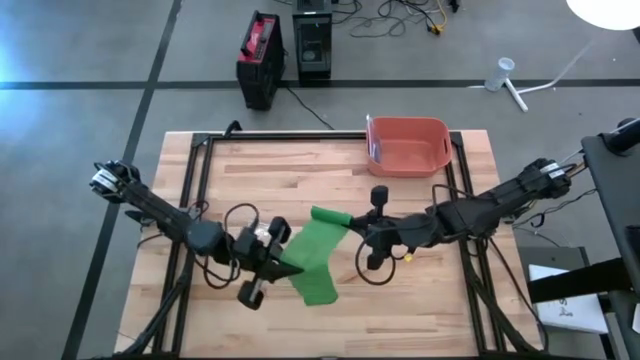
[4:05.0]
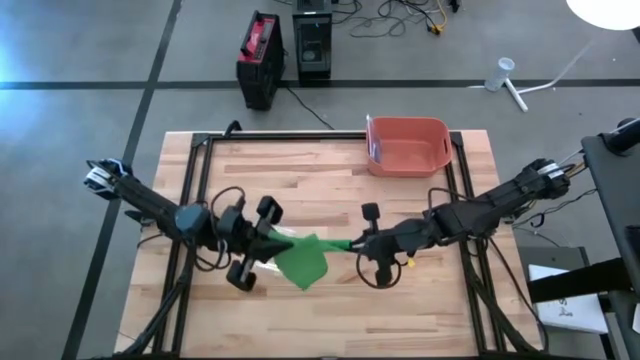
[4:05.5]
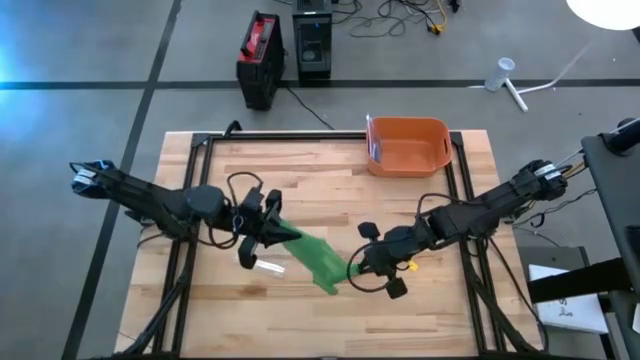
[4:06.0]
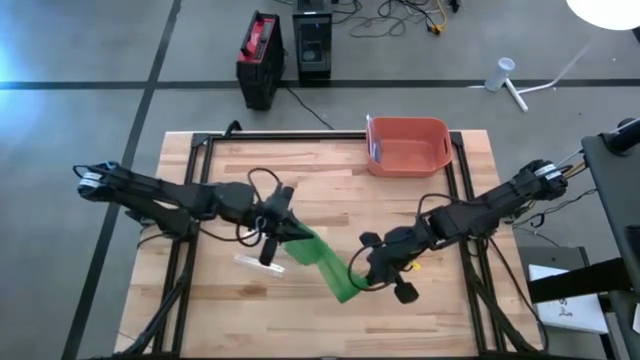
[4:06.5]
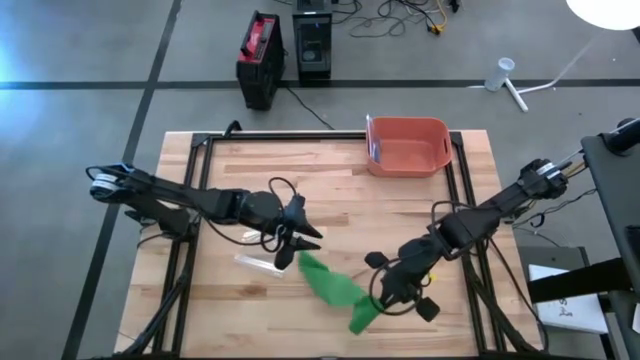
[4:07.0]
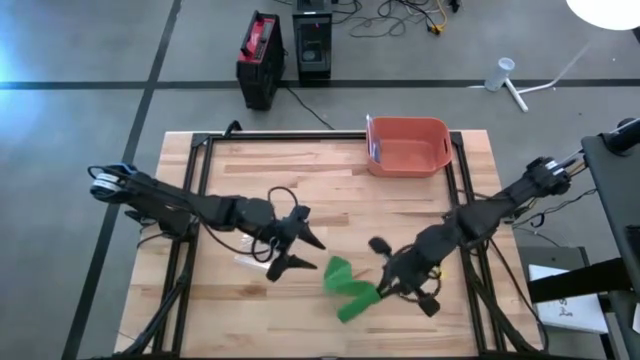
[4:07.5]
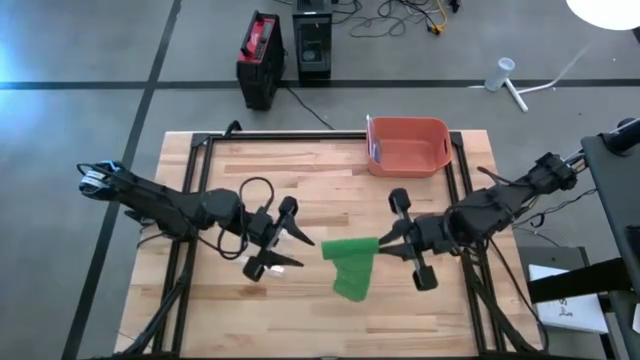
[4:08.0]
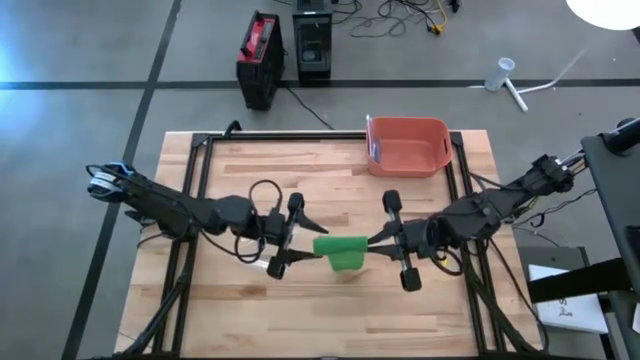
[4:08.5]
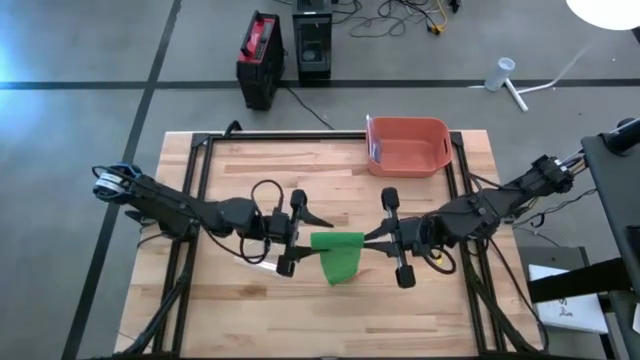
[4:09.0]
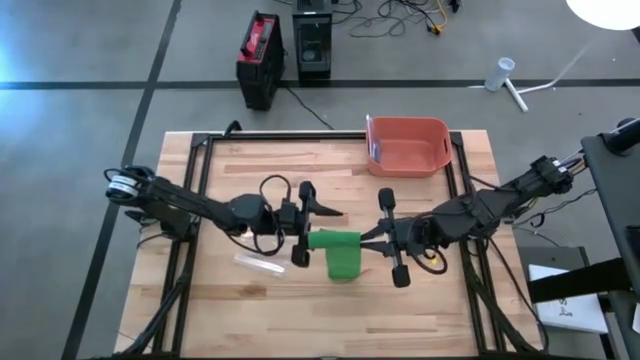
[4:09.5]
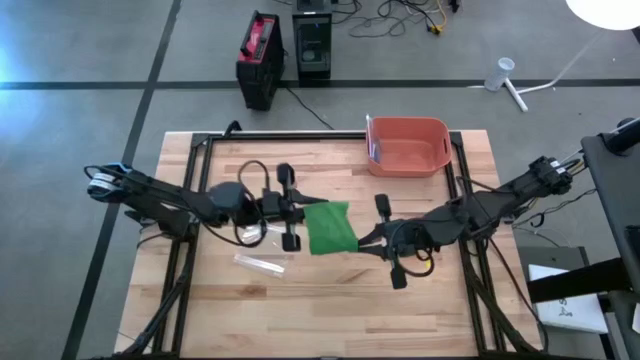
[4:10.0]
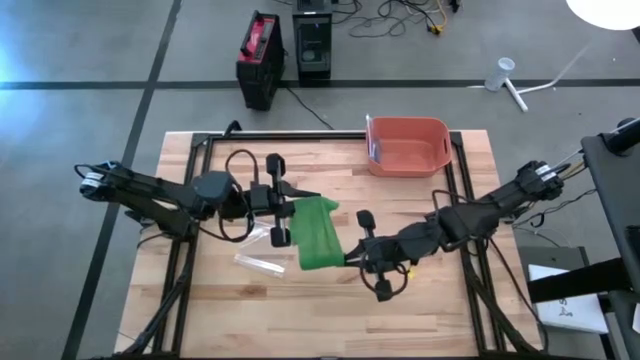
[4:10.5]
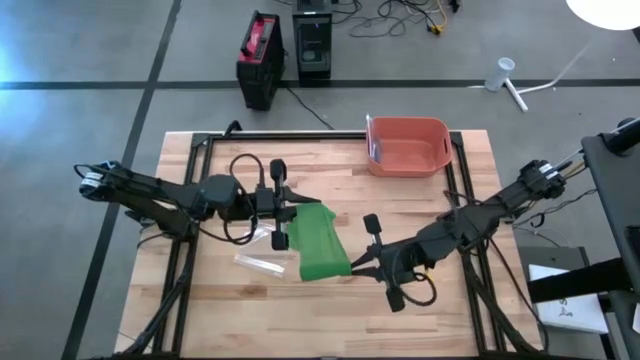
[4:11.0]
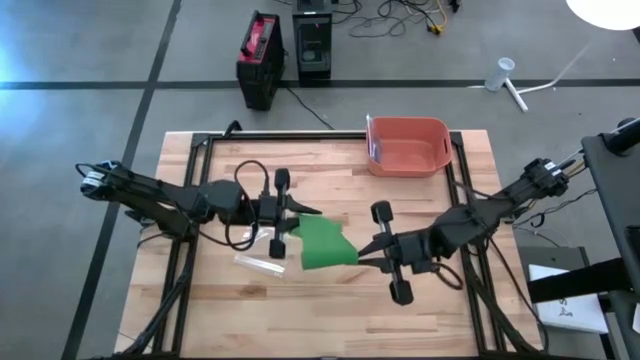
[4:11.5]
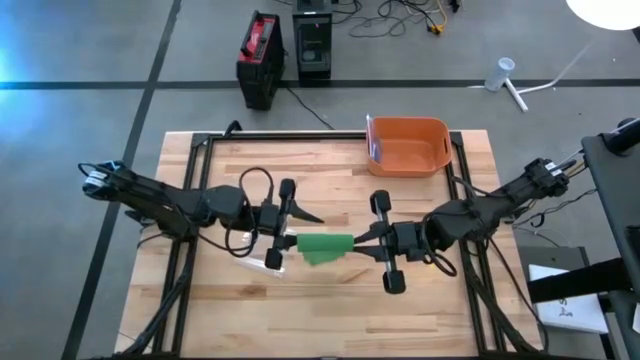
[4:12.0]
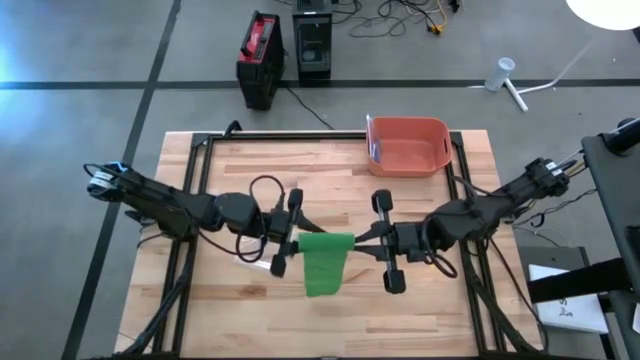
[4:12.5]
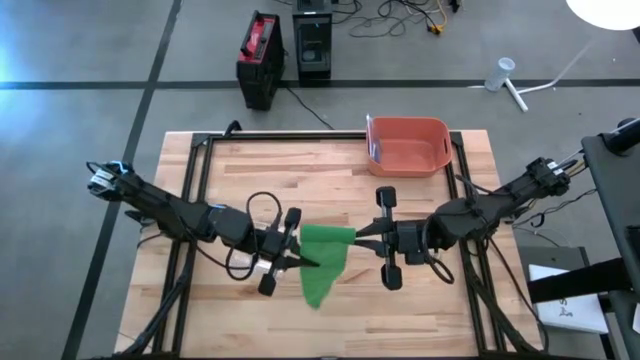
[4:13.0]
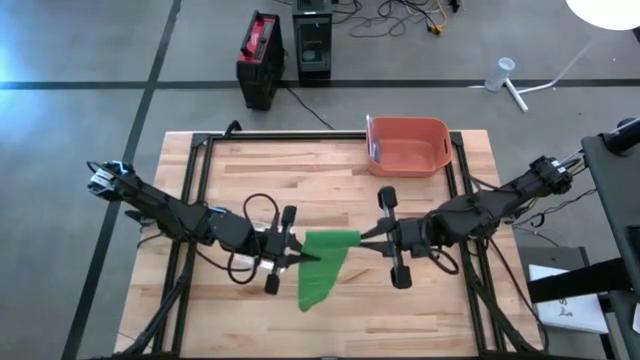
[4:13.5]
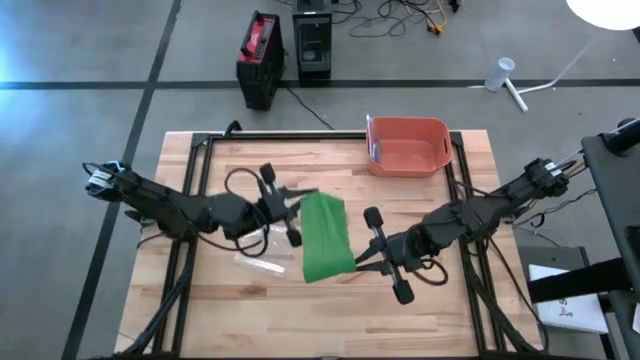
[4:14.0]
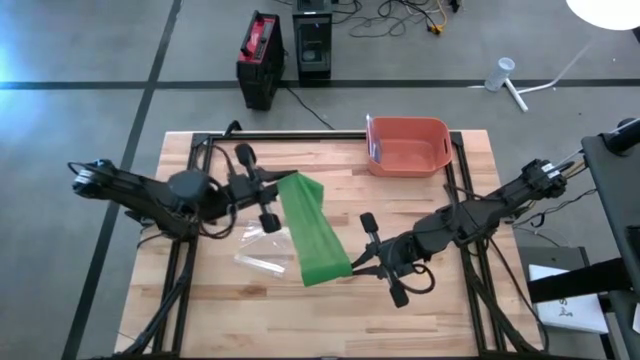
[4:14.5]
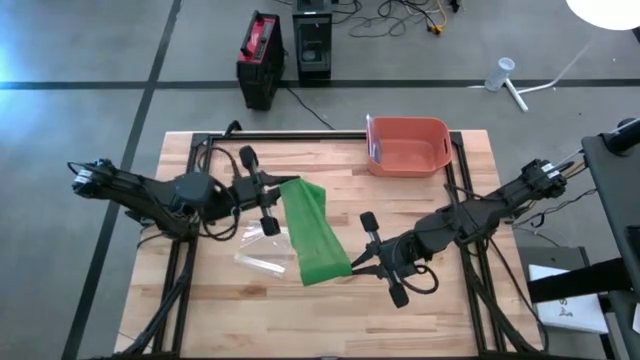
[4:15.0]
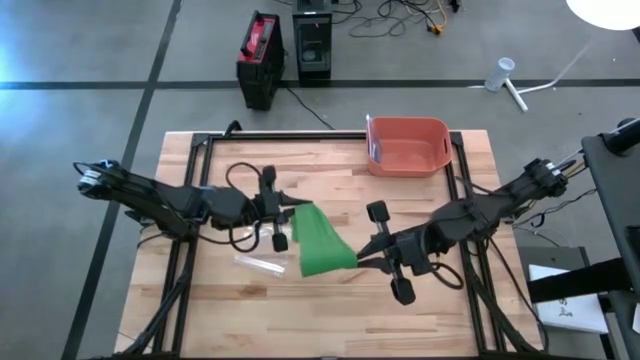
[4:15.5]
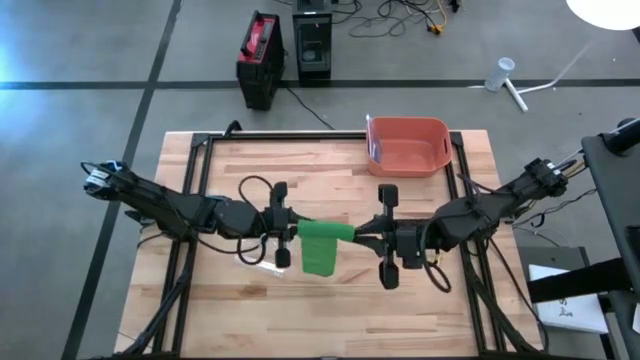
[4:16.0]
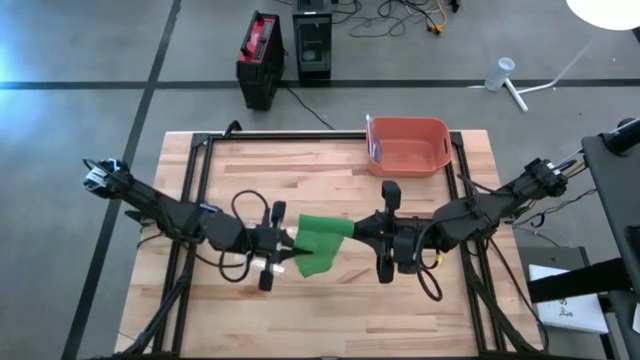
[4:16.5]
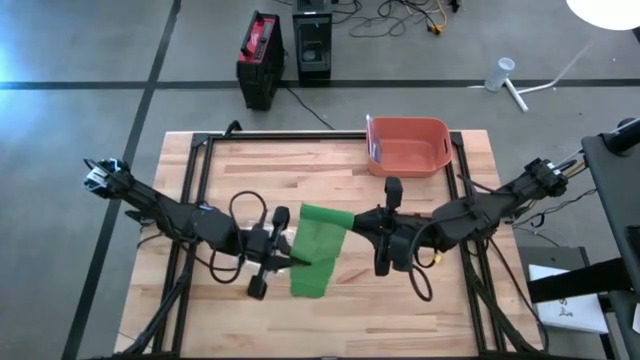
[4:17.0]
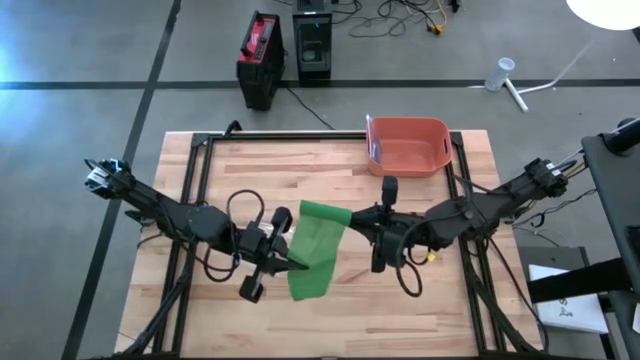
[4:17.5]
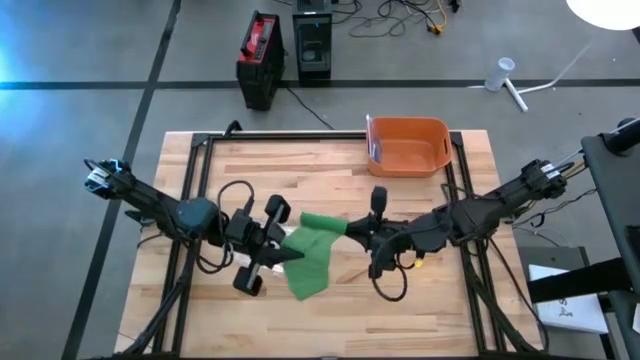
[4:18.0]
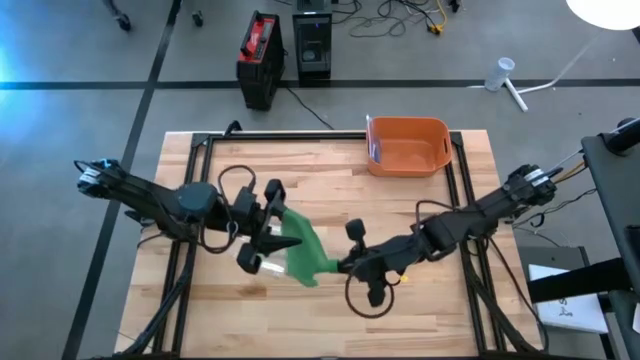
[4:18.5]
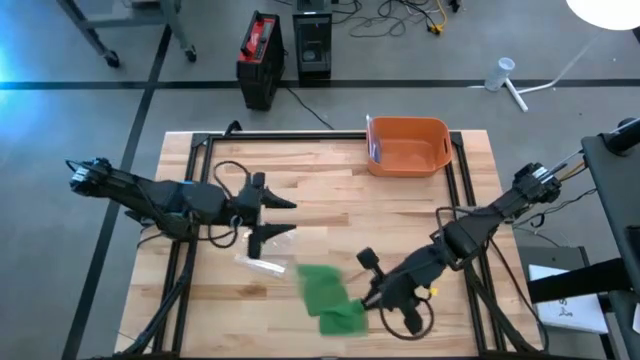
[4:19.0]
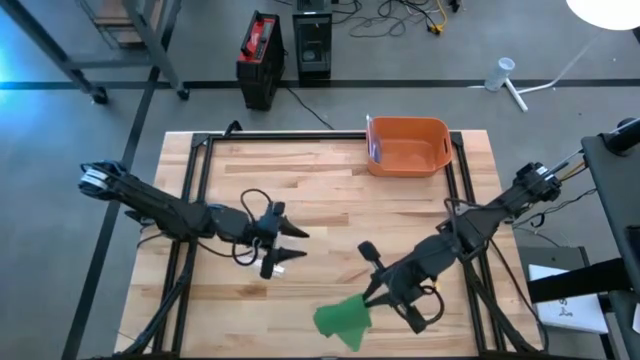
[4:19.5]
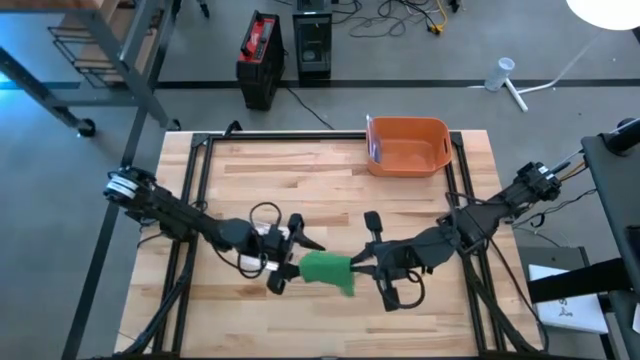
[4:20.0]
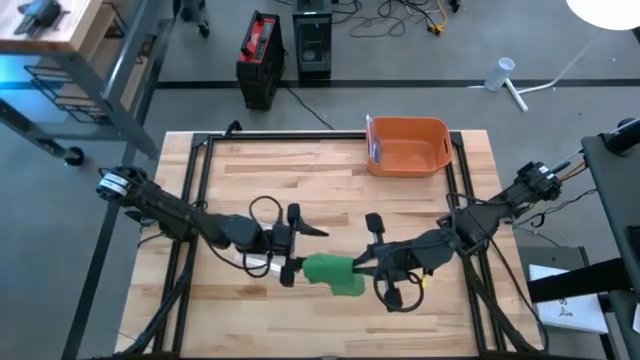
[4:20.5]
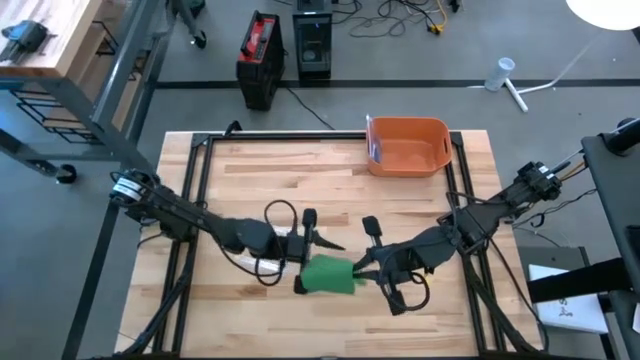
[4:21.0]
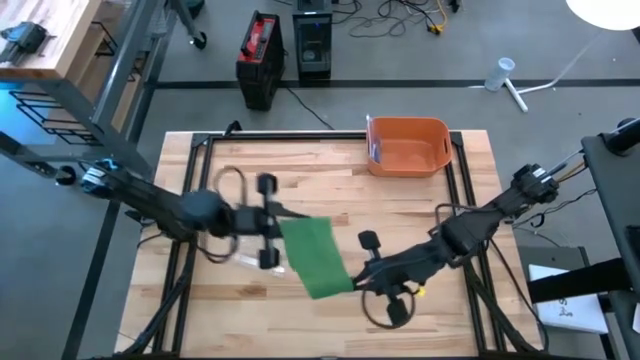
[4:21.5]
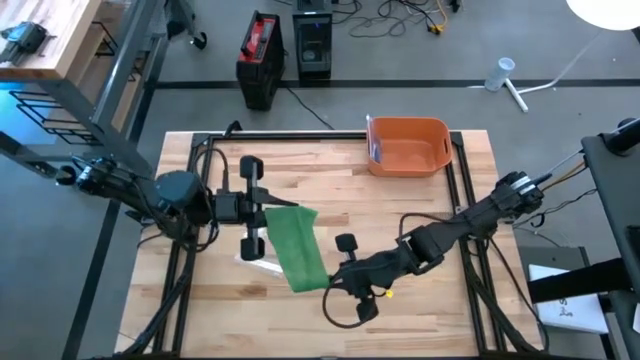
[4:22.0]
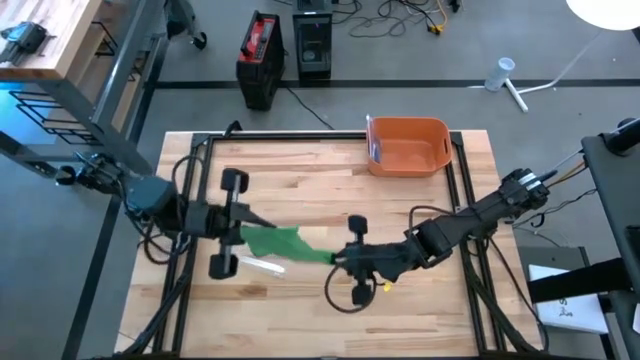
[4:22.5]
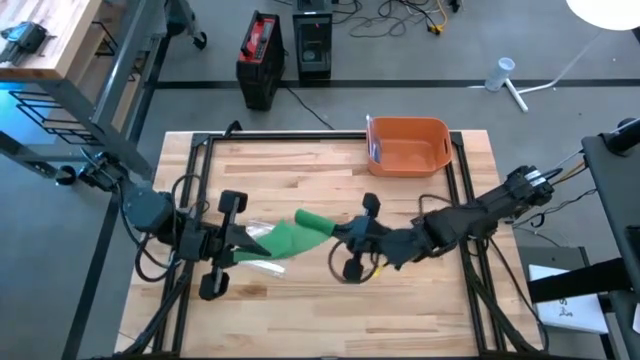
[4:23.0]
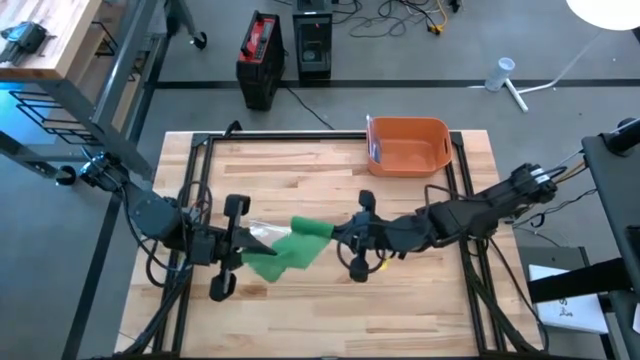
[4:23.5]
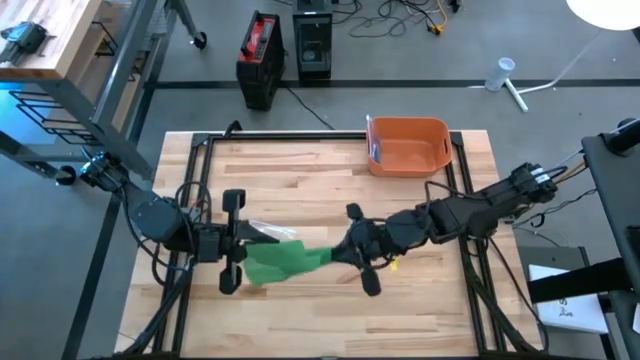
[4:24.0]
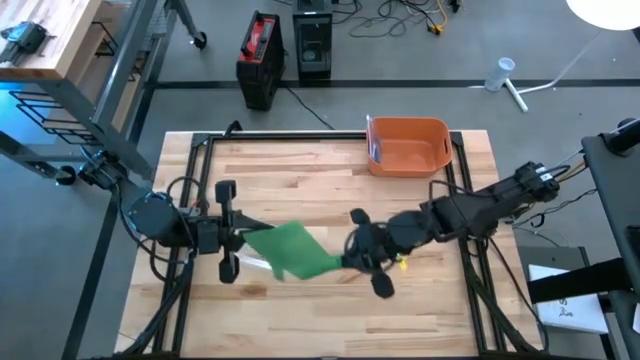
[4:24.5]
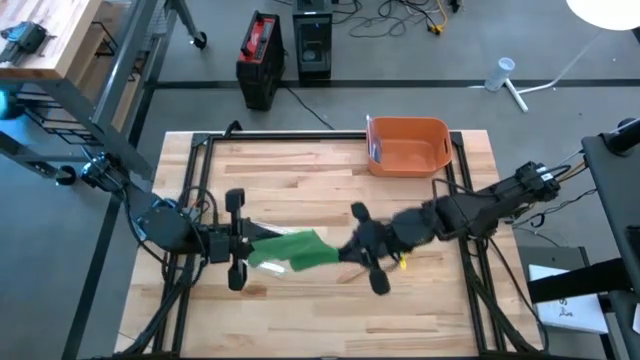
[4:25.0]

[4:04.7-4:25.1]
Task: Roll bandage
Roll the green bandage
